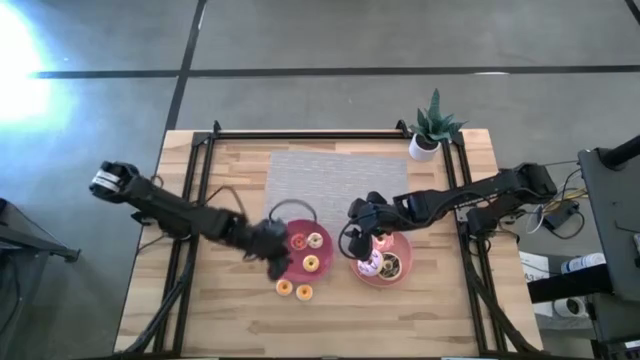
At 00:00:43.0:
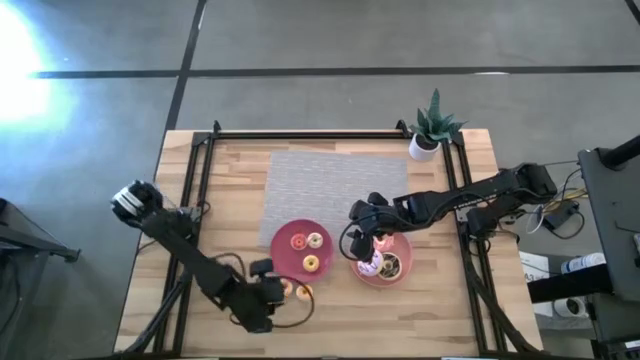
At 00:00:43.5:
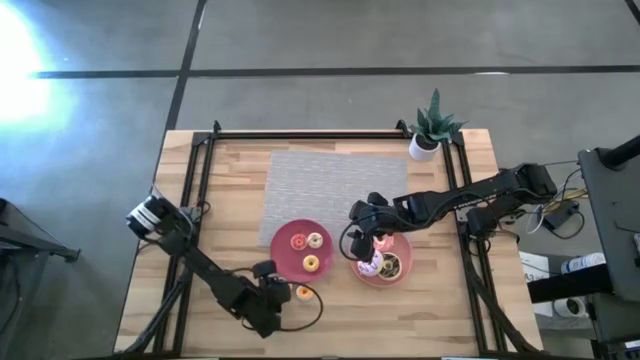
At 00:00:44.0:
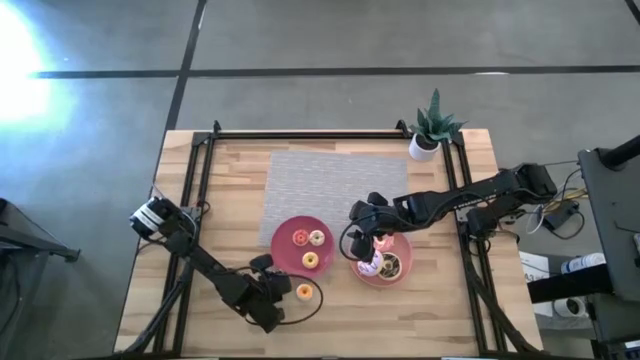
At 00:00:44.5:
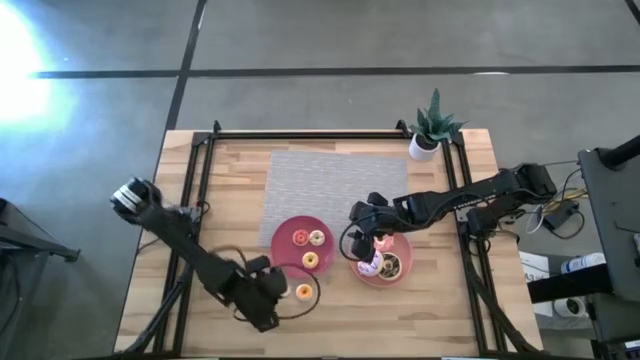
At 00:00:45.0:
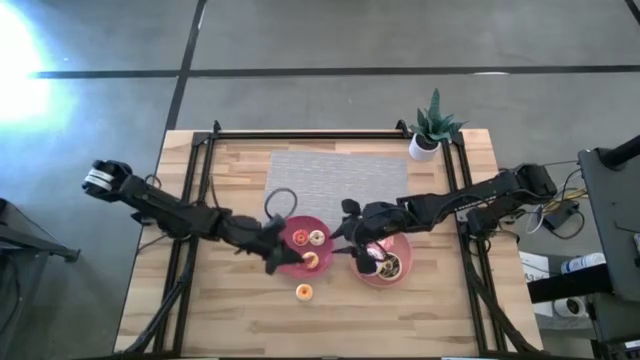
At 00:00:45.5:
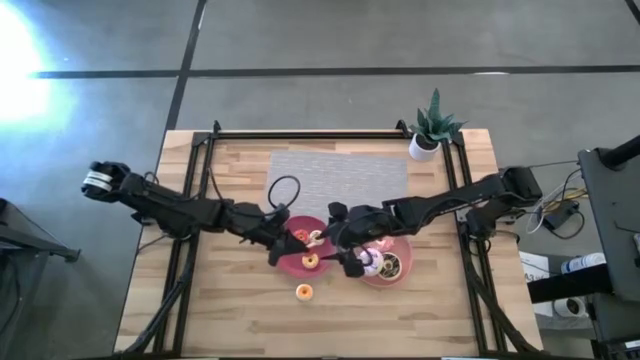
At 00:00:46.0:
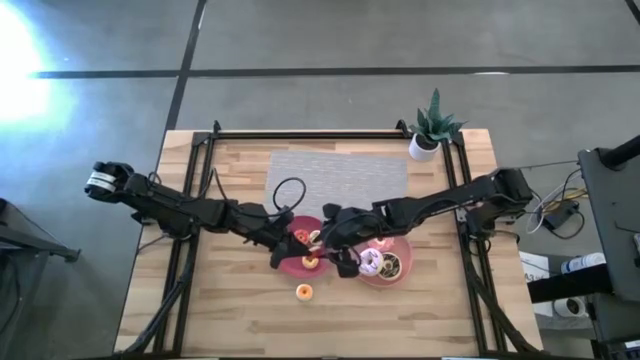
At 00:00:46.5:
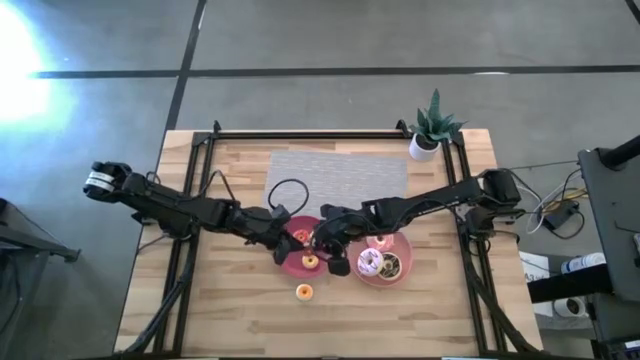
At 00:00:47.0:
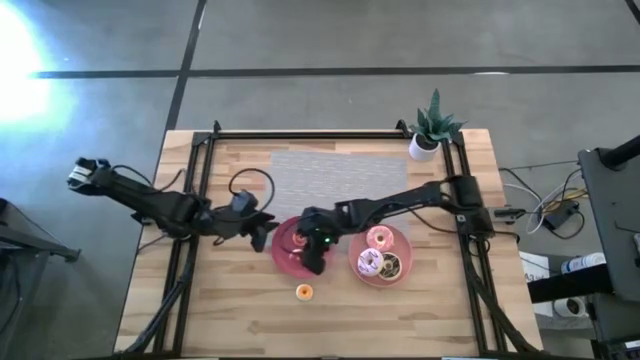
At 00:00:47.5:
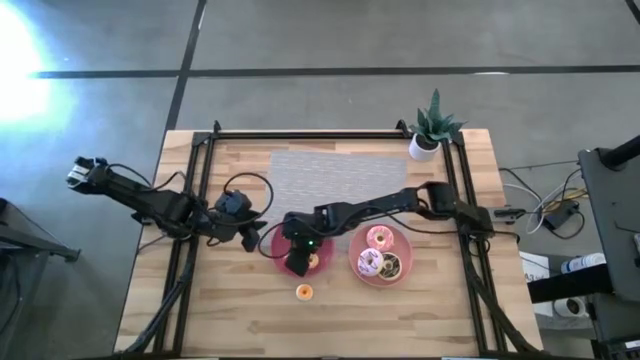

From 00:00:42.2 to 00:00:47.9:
Task: Pick & Place donuts
Put the small red donut on the pink plate

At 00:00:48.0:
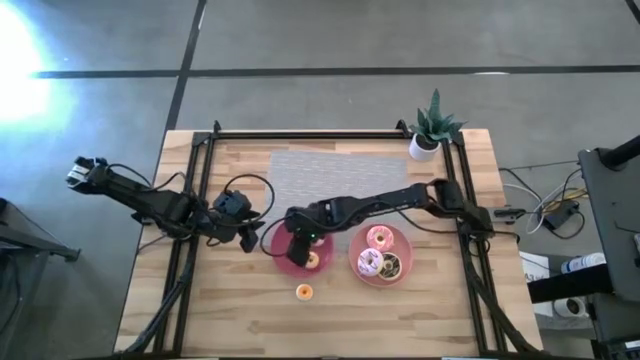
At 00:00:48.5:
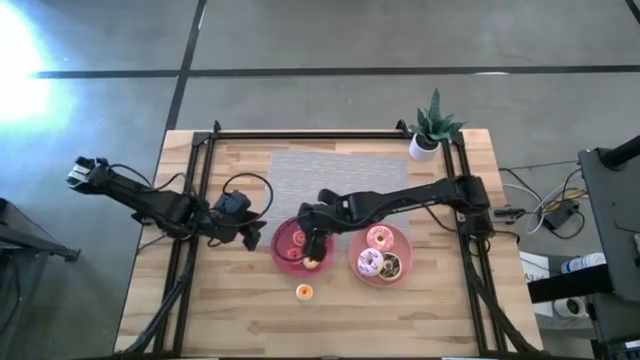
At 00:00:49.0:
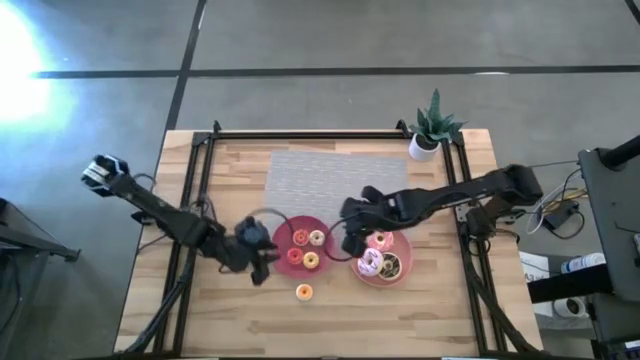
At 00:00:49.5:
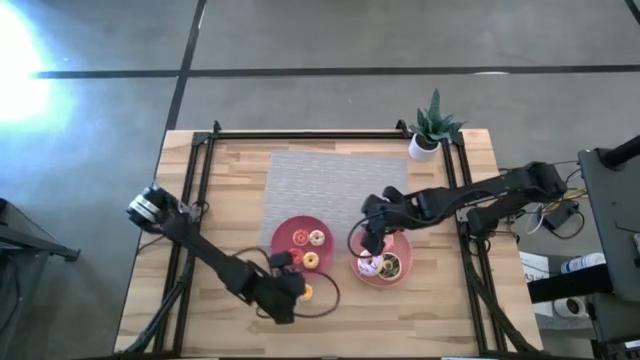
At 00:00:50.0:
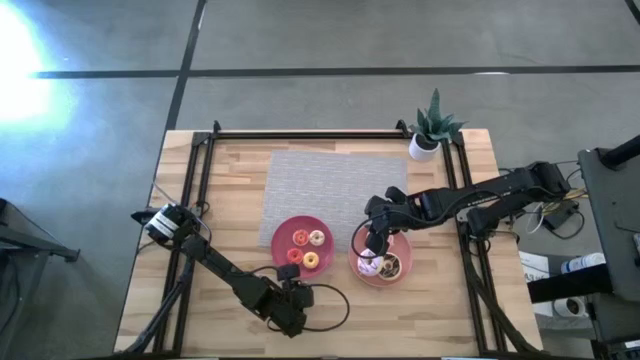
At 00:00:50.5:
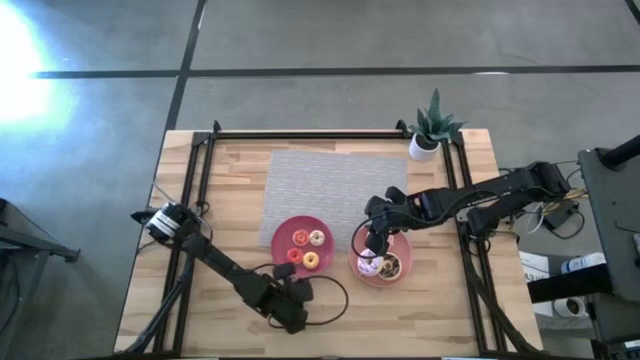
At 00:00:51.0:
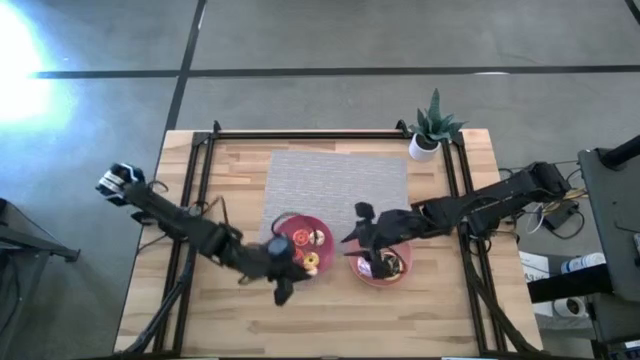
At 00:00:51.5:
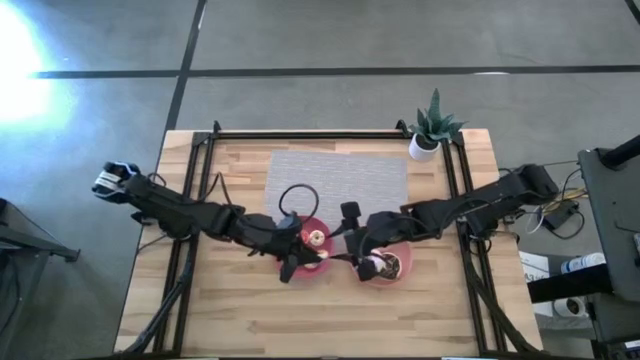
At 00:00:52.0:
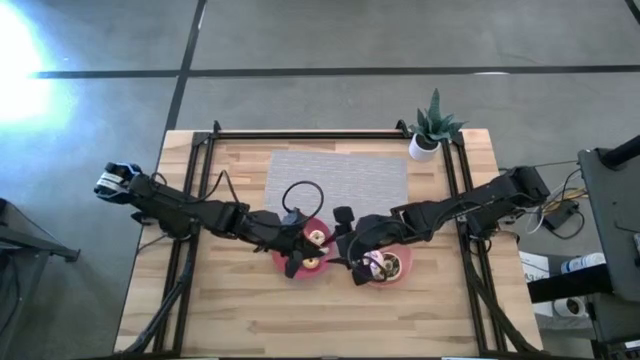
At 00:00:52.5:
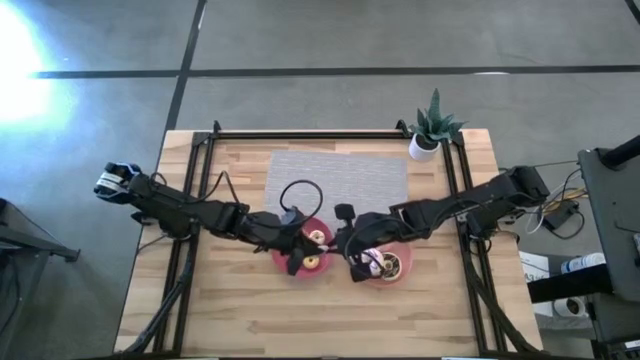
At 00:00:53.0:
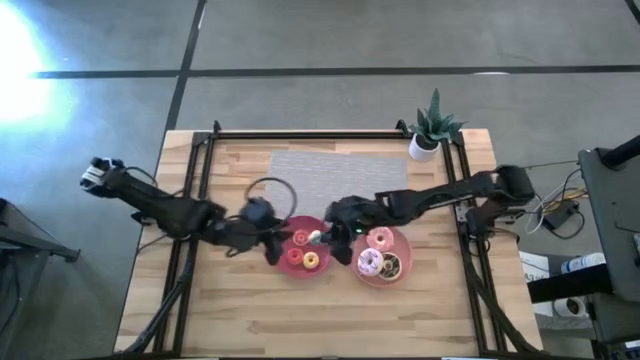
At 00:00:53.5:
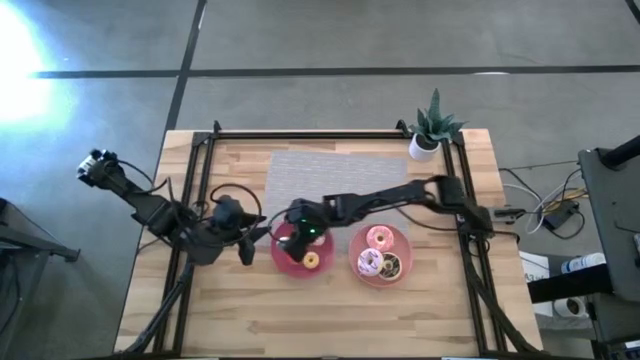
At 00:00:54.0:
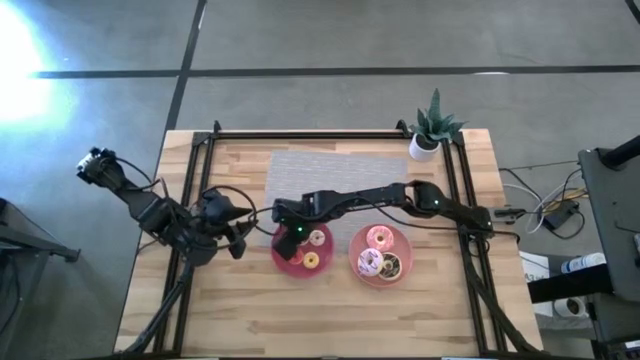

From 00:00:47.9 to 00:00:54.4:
Put the small blue donut on the pink plate

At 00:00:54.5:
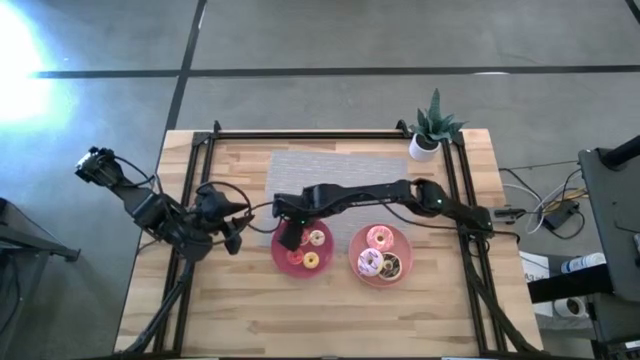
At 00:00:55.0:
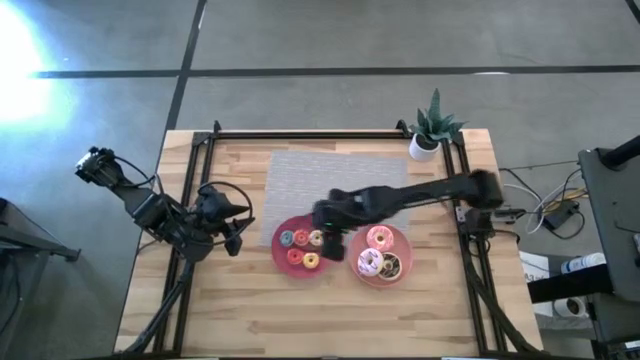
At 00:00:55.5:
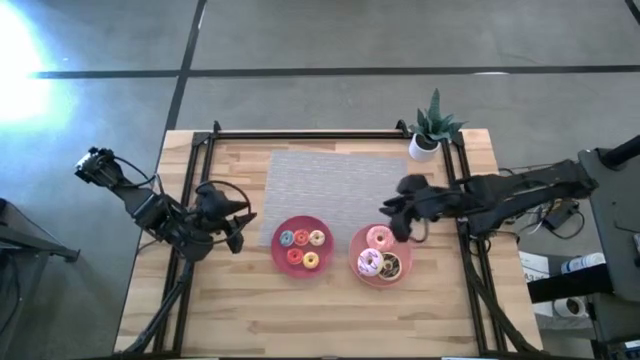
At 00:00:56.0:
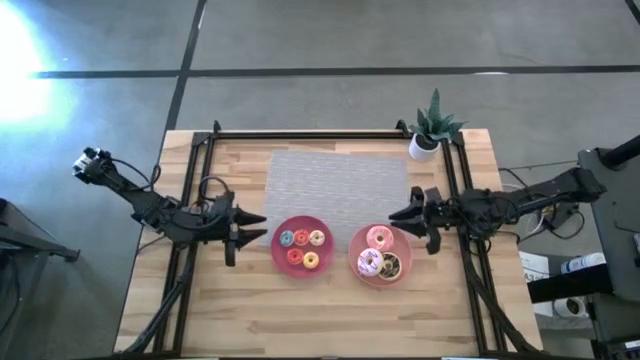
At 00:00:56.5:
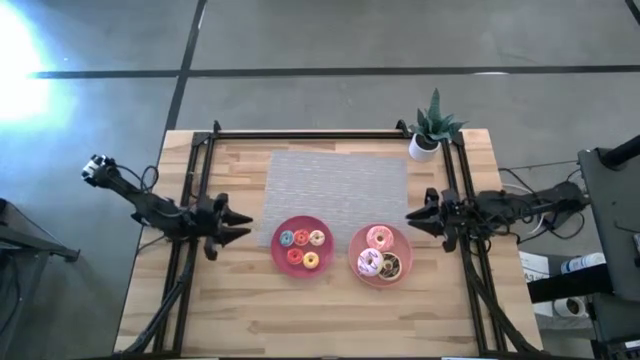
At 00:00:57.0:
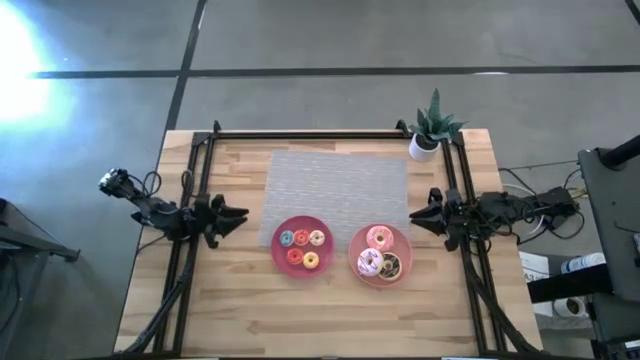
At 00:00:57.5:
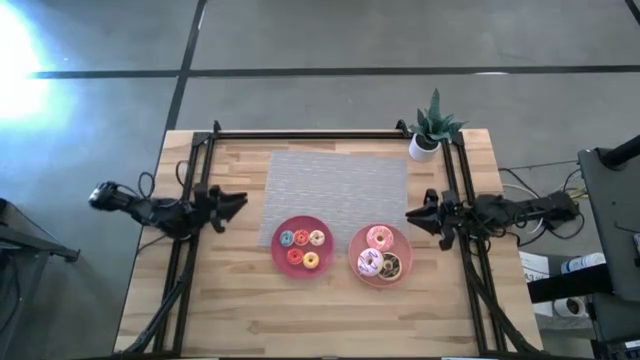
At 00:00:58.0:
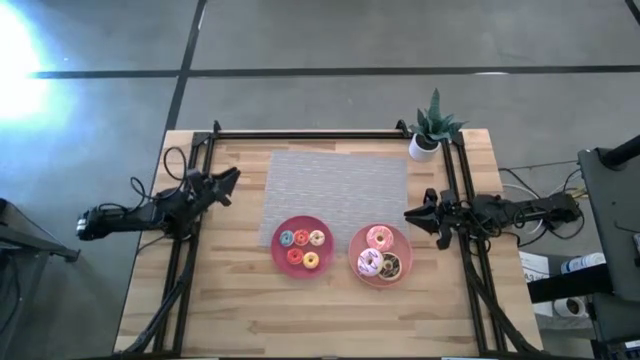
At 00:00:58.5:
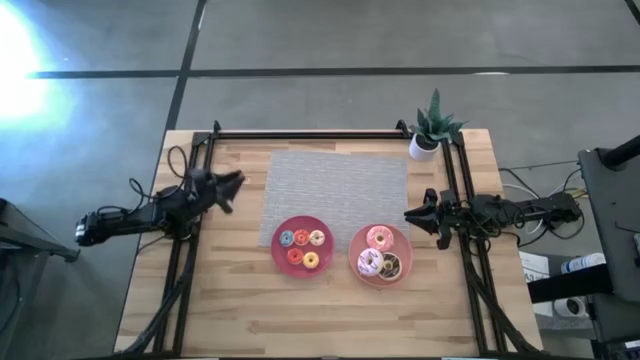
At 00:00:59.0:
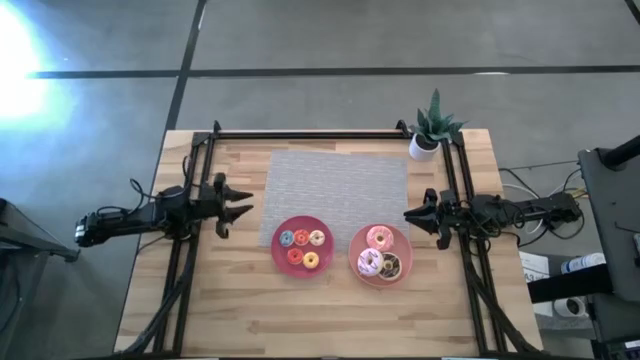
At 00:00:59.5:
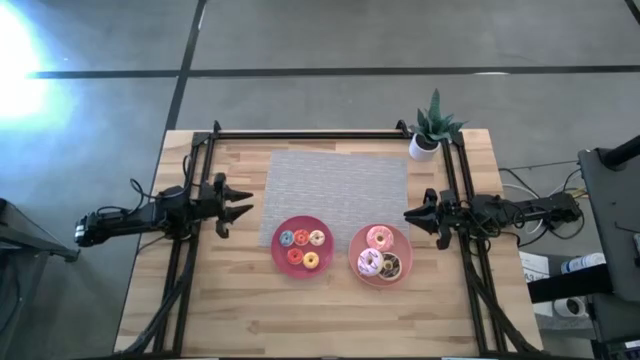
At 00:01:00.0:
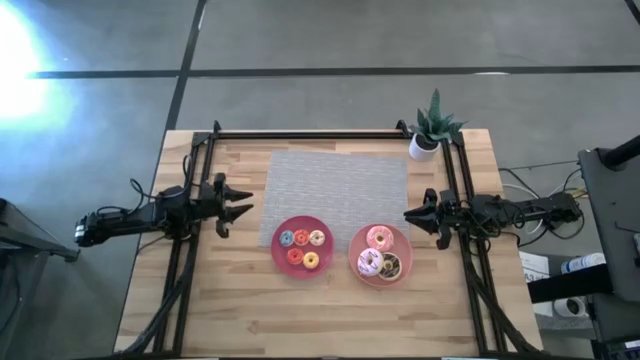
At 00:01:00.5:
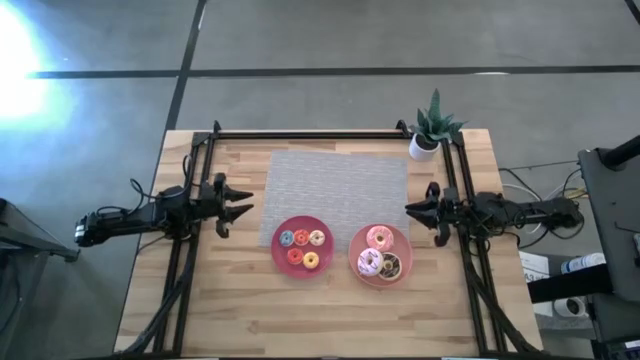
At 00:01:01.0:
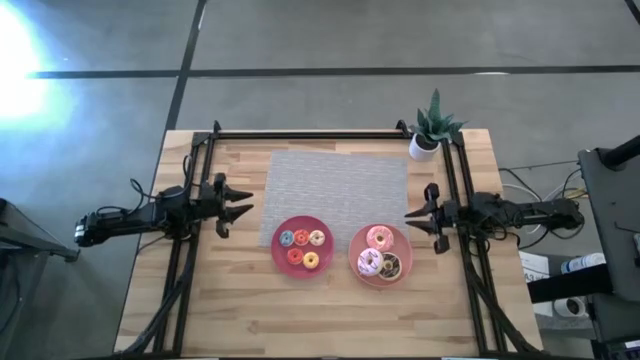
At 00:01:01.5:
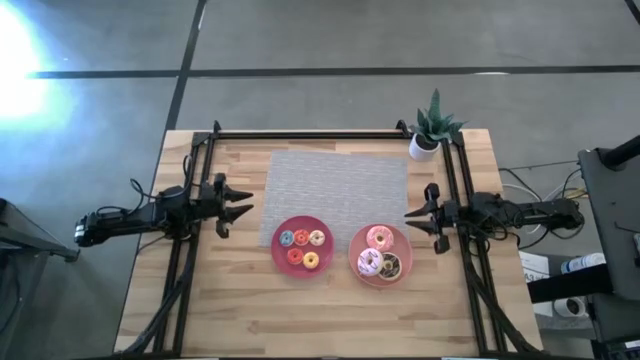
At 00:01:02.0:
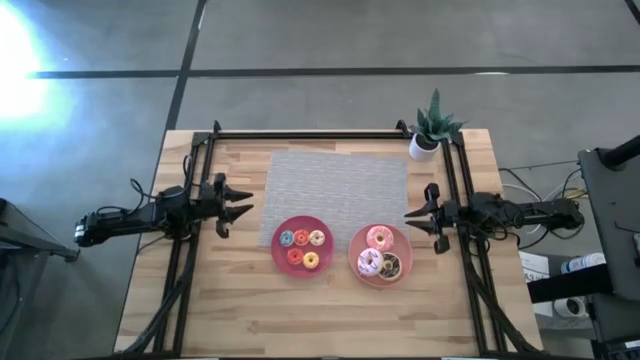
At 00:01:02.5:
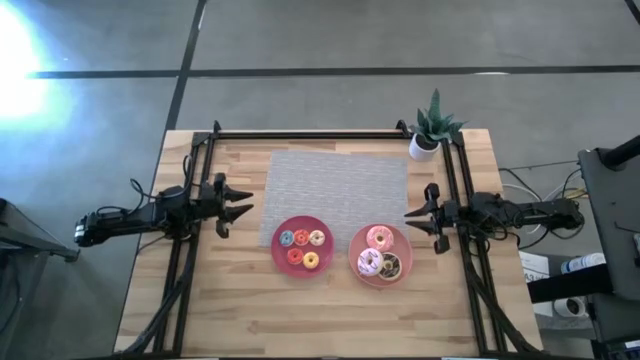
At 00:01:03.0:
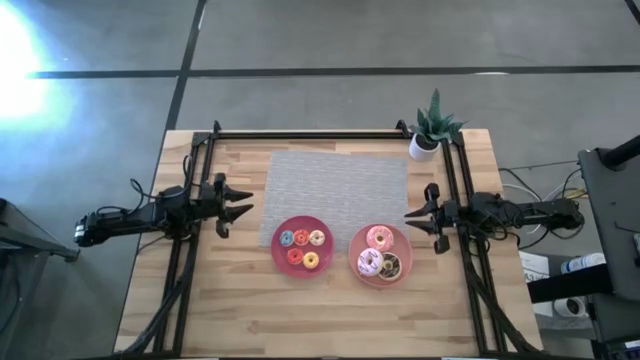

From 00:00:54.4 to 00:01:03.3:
Return to Home Position
